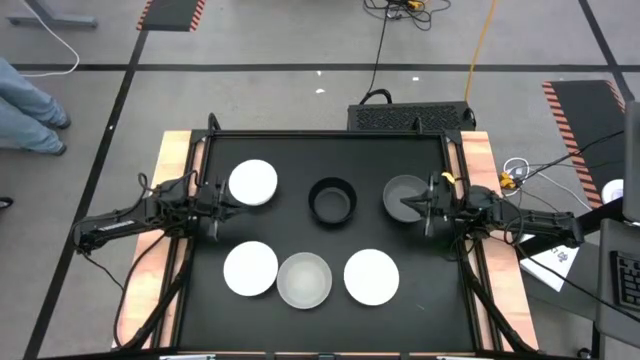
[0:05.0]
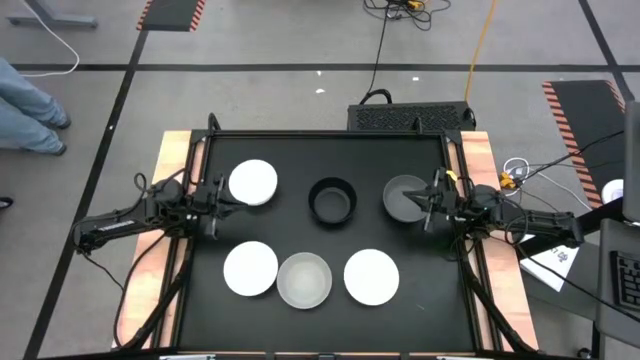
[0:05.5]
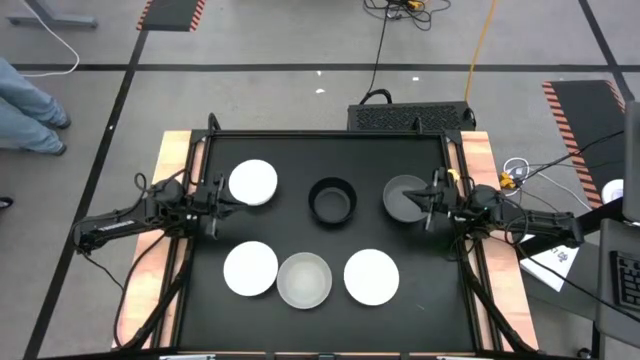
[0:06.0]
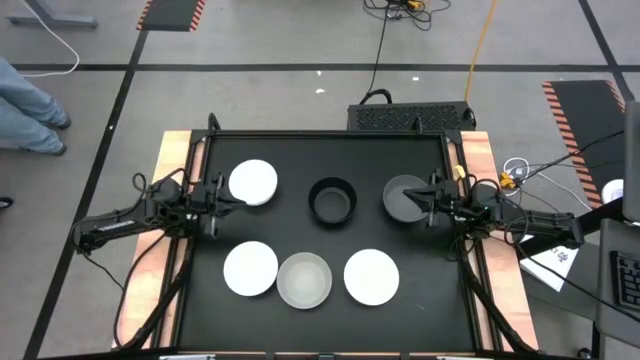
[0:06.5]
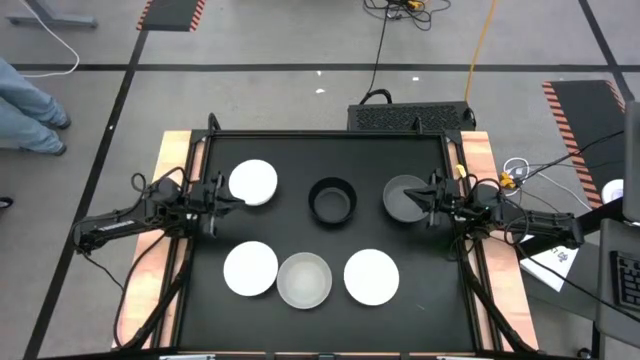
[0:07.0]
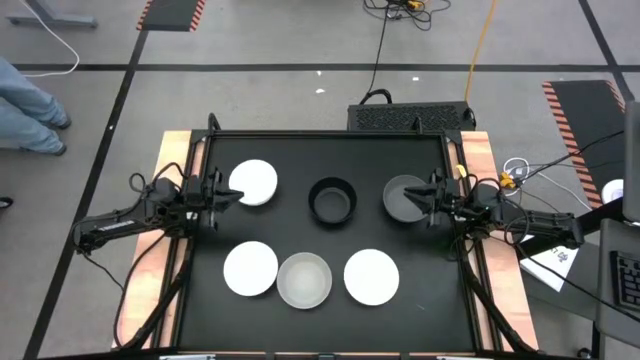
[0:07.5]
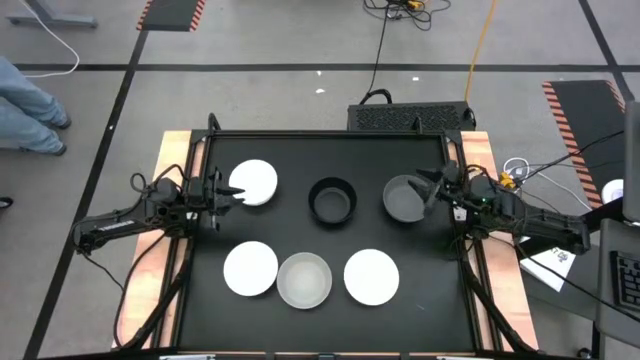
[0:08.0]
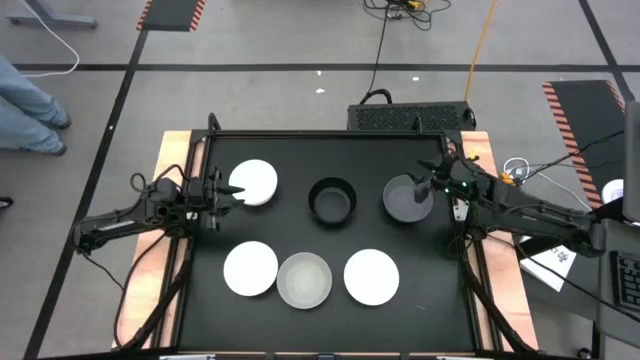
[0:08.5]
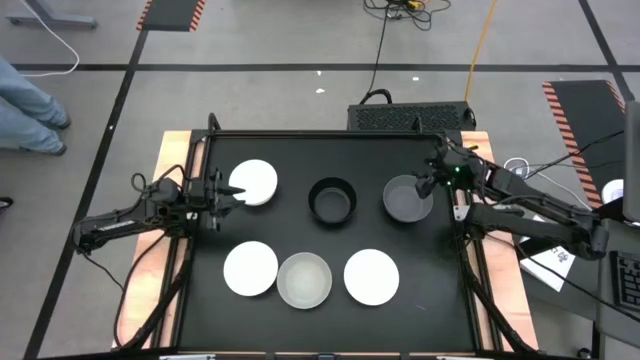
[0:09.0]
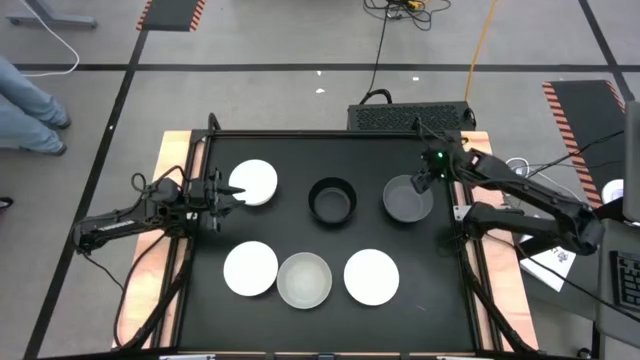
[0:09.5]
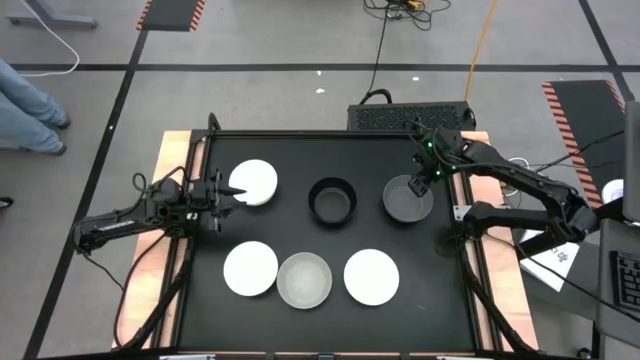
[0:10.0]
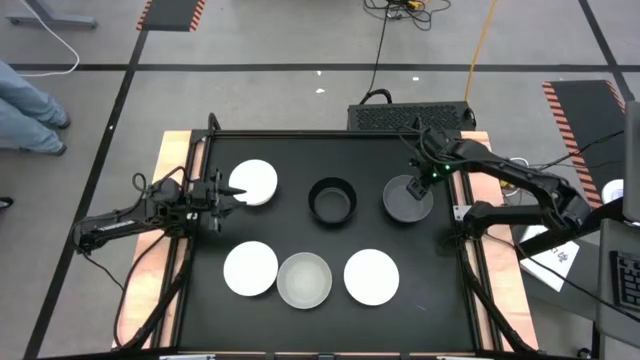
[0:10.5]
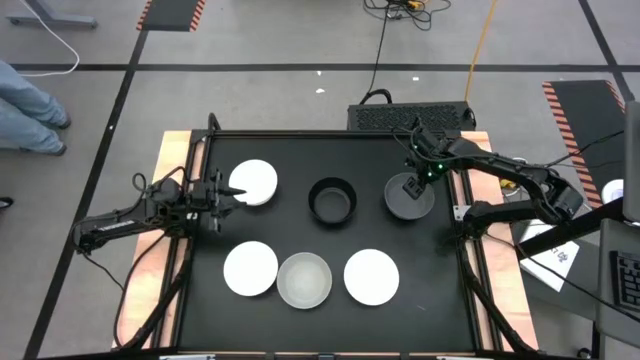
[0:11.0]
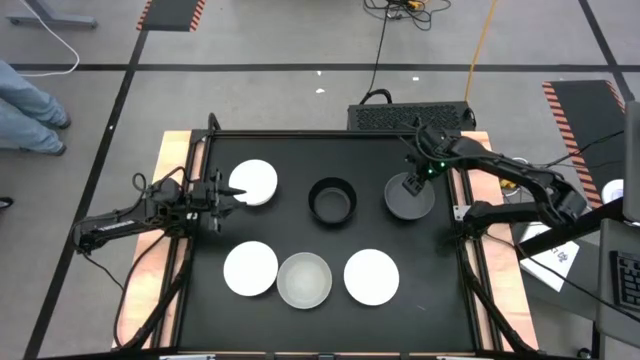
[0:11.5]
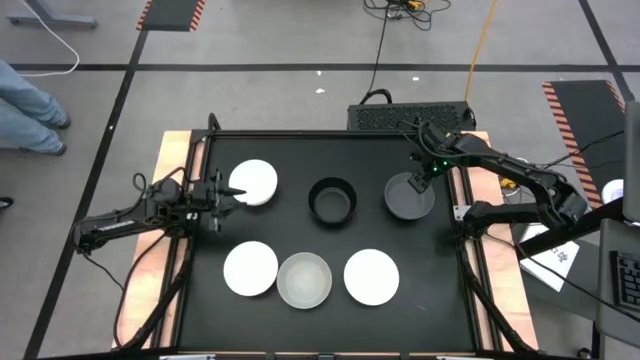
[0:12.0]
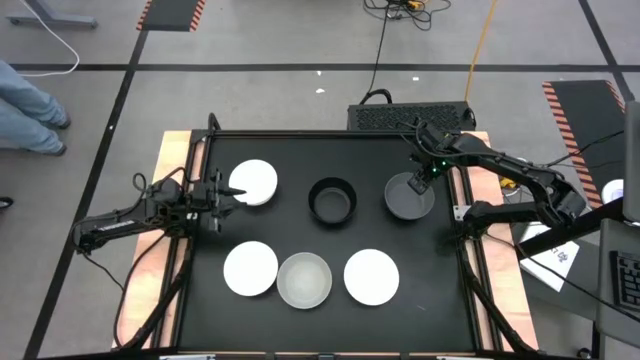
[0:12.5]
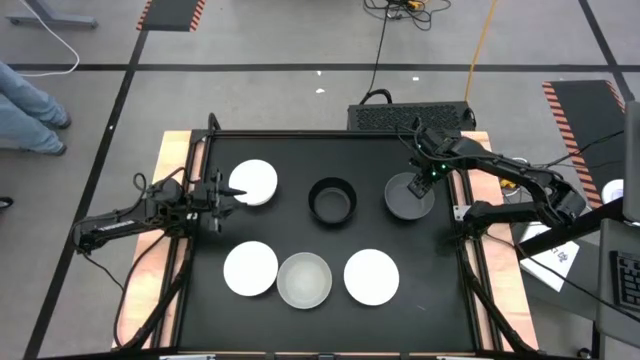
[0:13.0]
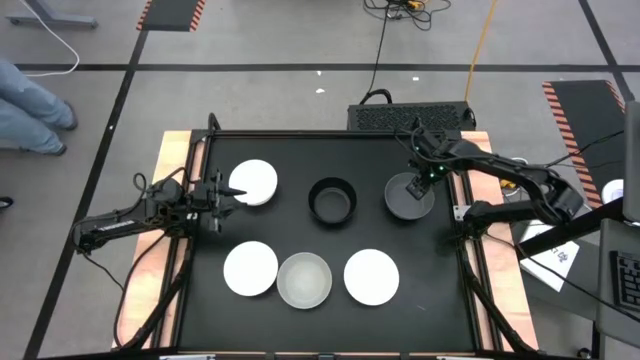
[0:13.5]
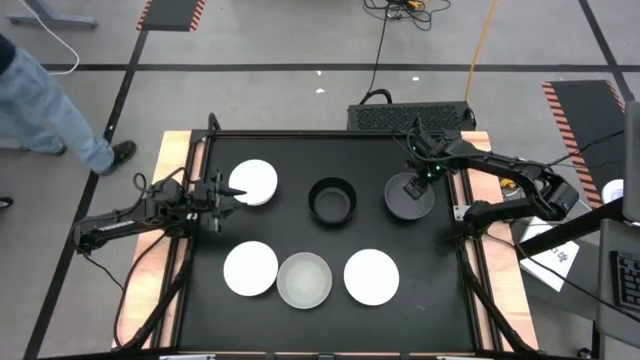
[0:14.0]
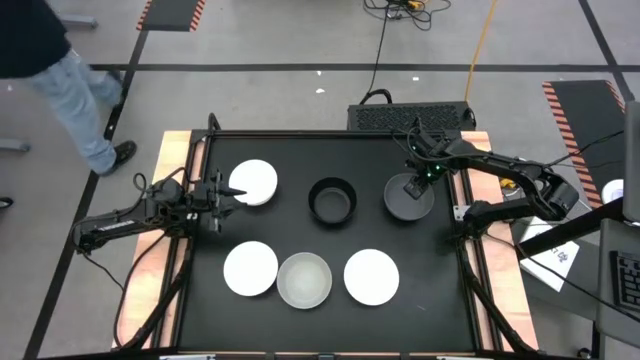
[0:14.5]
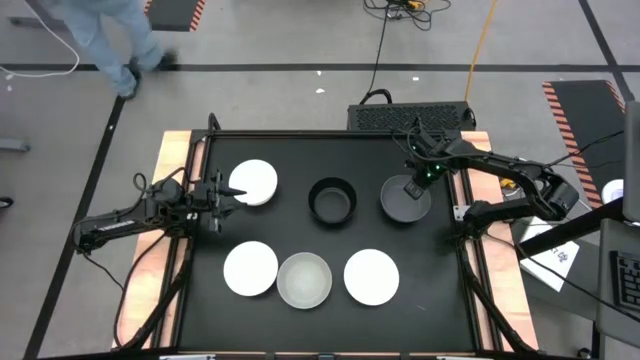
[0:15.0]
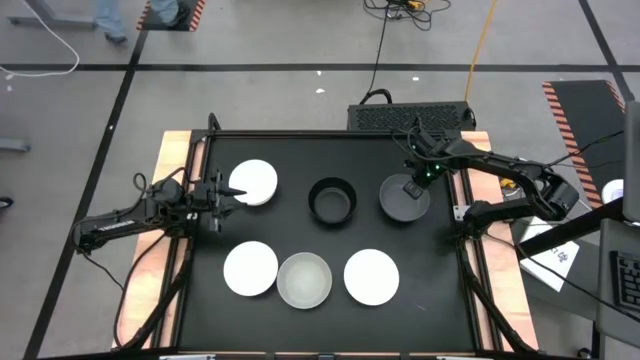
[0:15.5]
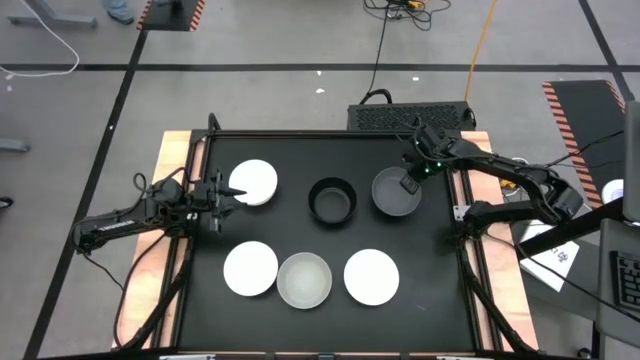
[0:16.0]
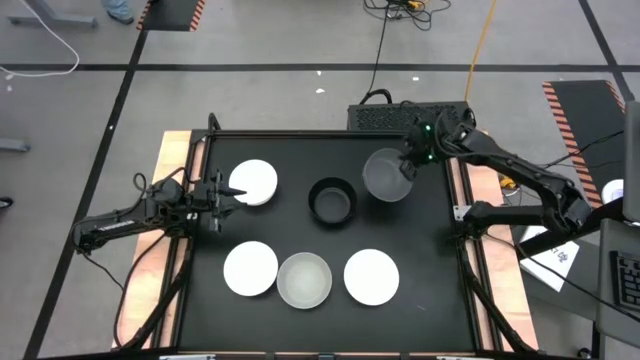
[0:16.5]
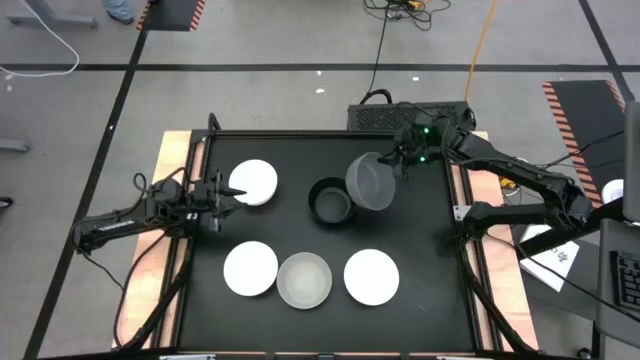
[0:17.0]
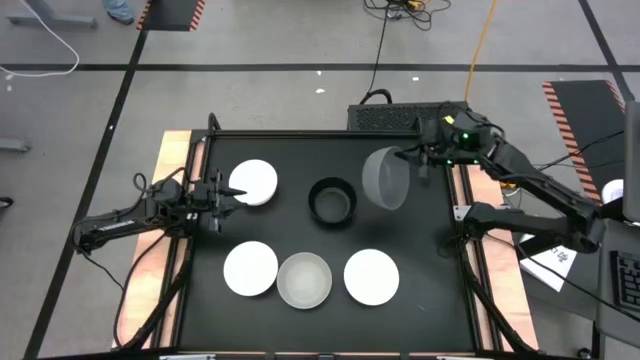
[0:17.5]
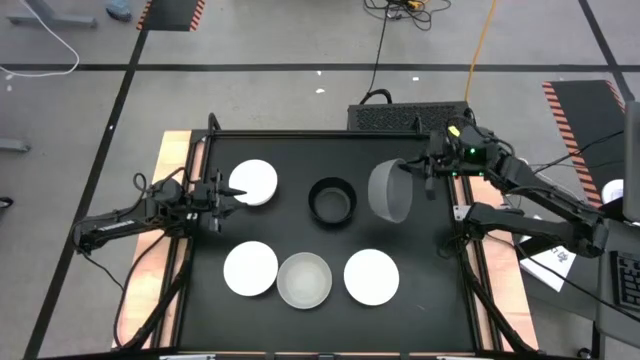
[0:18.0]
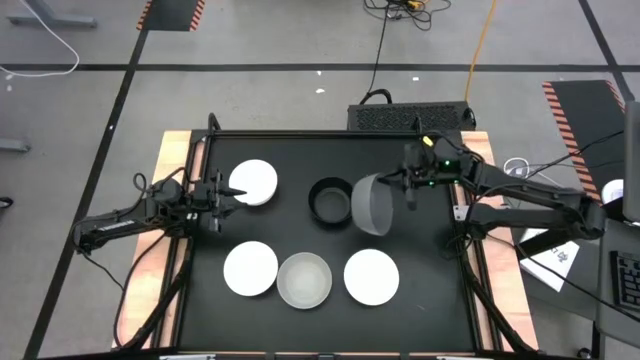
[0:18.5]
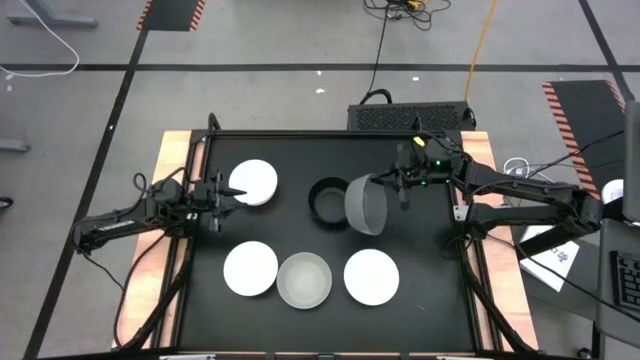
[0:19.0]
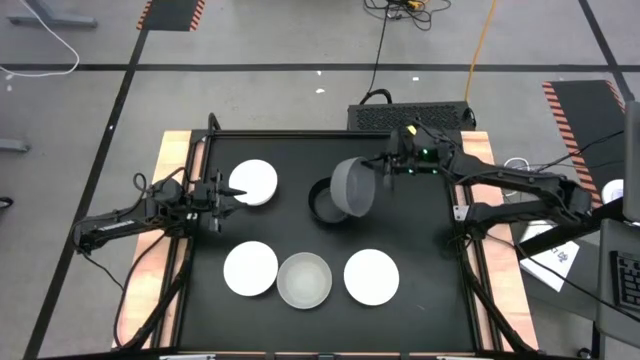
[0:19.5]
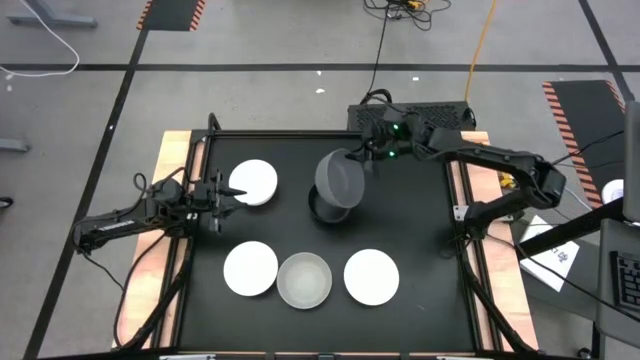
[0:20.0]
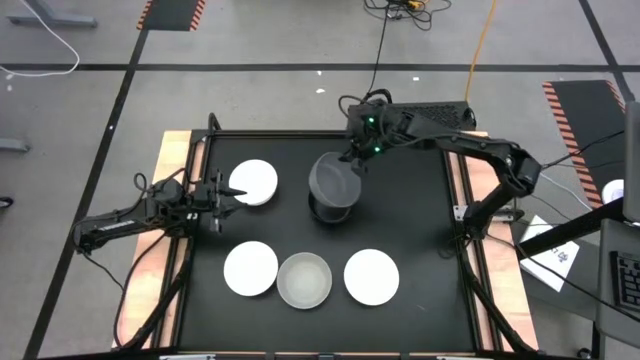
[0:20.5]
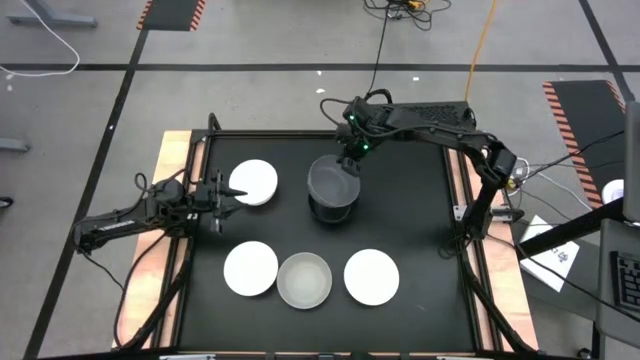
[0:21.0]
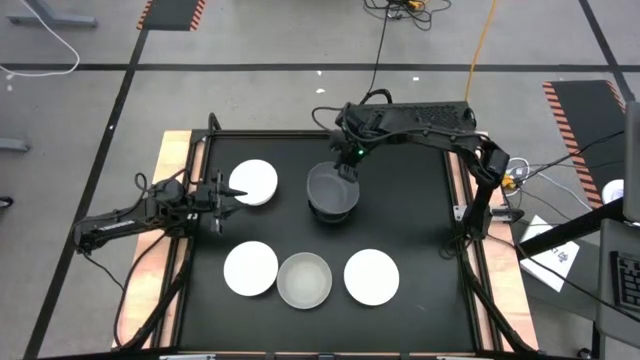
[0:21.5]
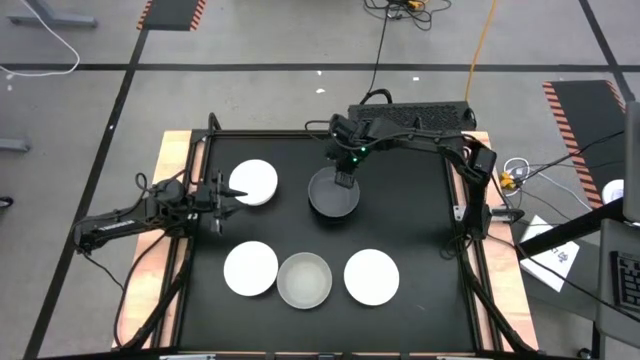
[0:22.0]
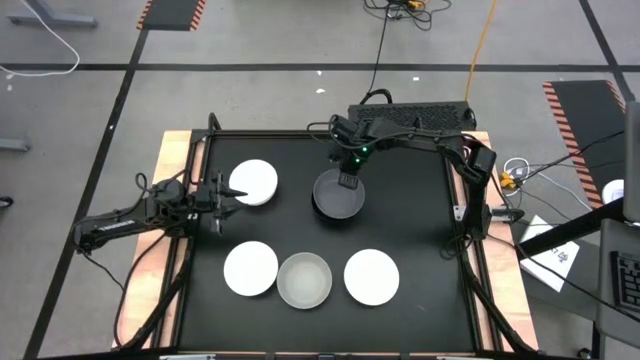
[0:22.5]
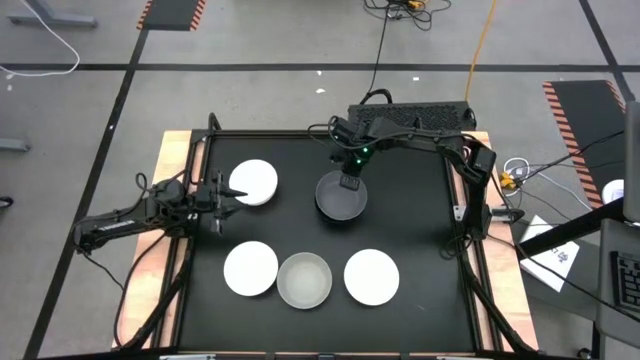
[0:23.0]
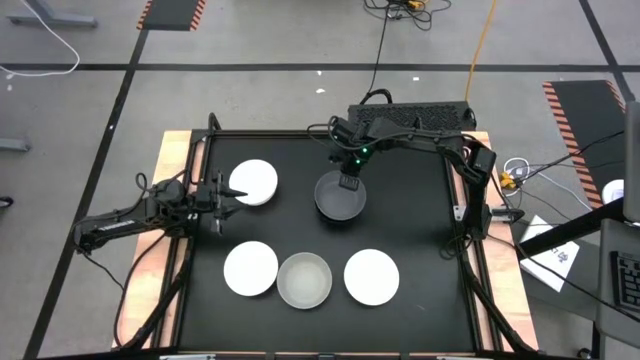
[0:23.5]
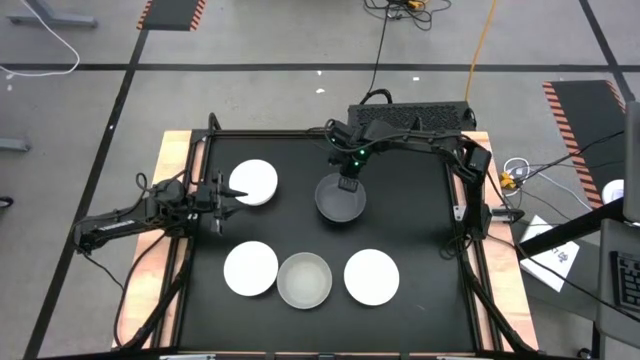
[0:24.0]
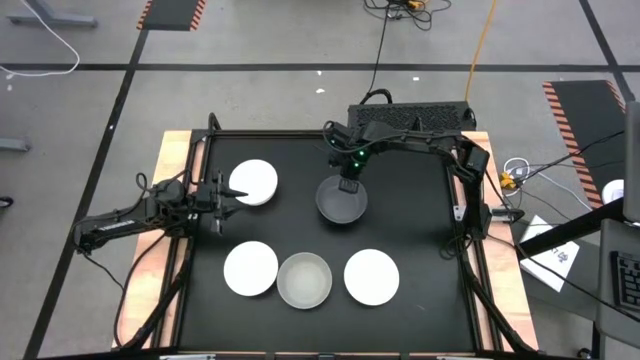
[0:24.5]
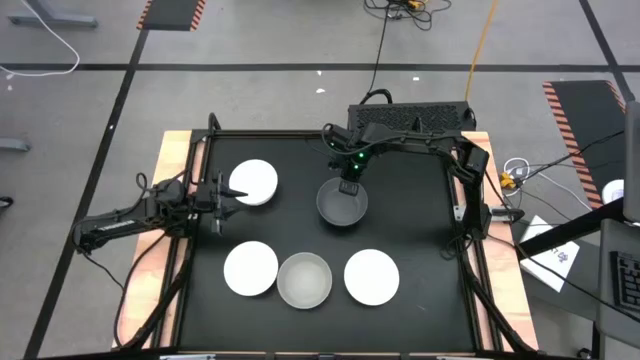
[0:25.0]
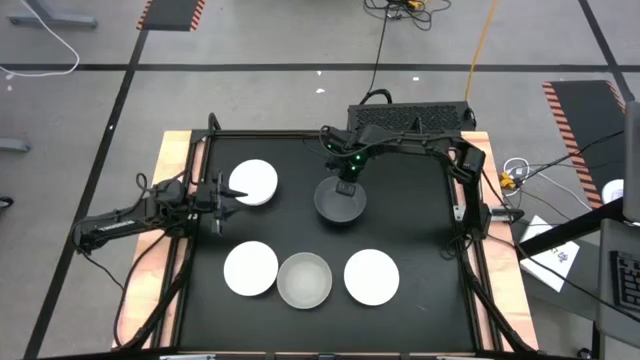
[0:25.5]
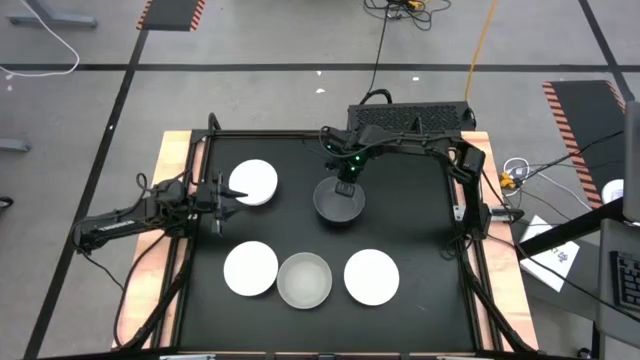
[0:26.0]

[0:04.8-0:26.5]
Task: Nest bowls inside each other
Stack the gray bowl on the black bowl
